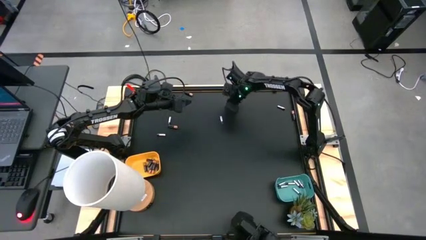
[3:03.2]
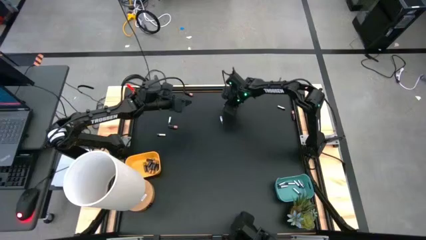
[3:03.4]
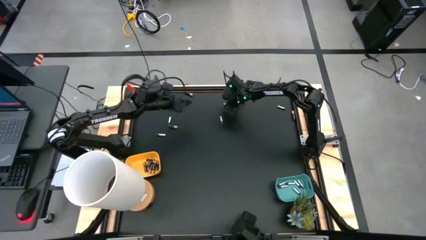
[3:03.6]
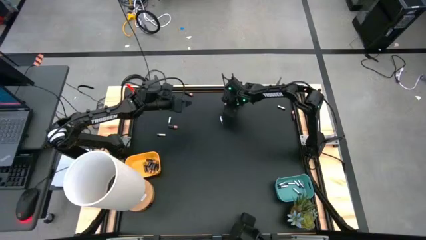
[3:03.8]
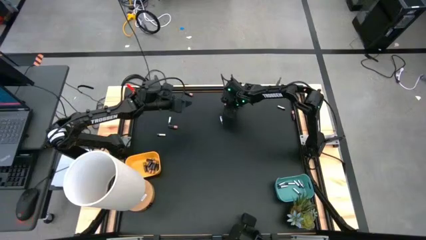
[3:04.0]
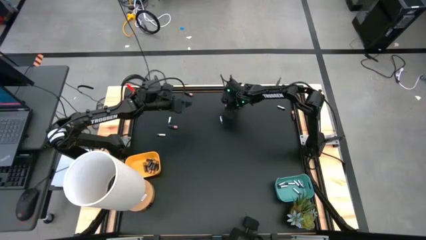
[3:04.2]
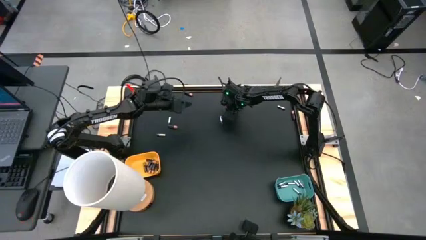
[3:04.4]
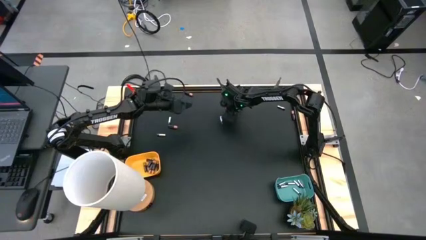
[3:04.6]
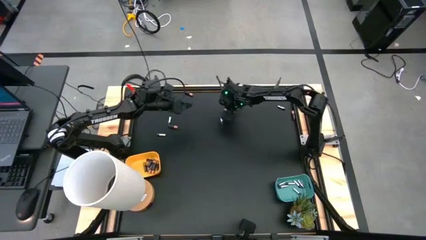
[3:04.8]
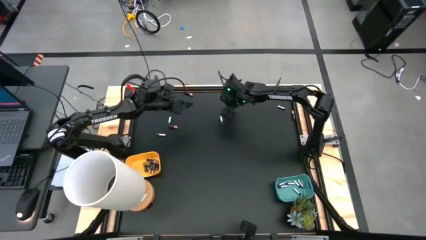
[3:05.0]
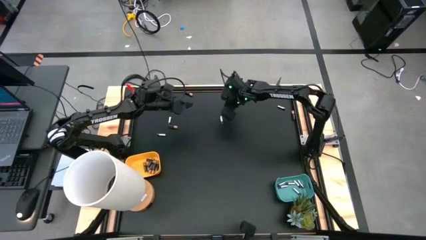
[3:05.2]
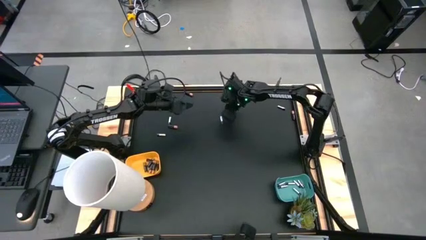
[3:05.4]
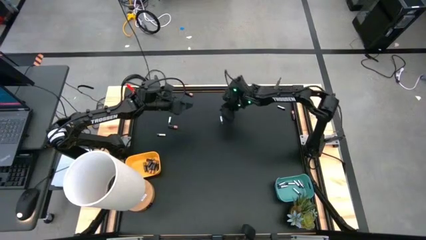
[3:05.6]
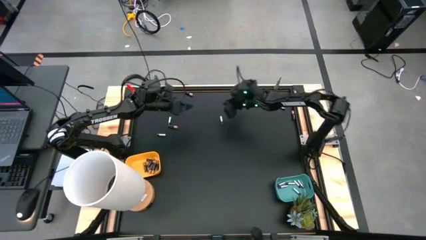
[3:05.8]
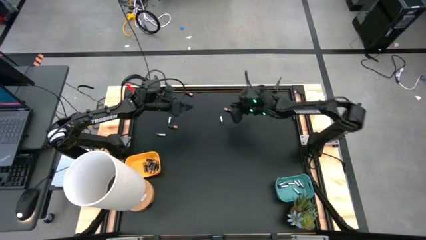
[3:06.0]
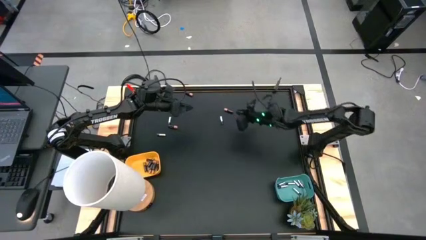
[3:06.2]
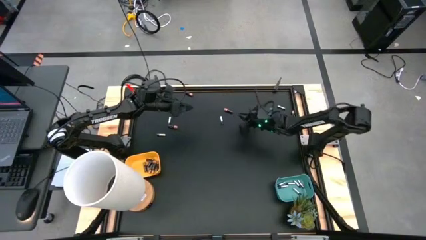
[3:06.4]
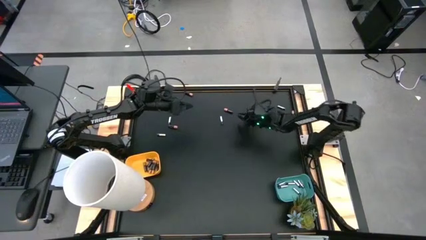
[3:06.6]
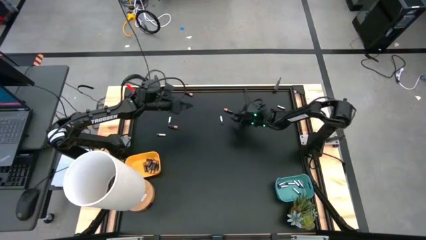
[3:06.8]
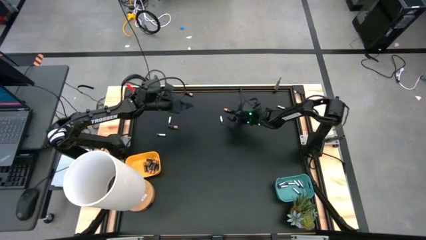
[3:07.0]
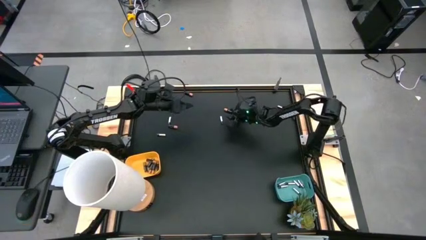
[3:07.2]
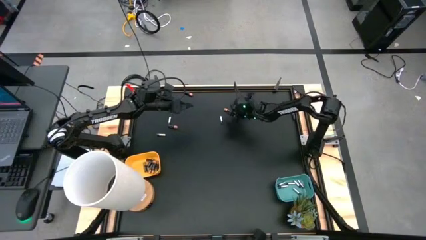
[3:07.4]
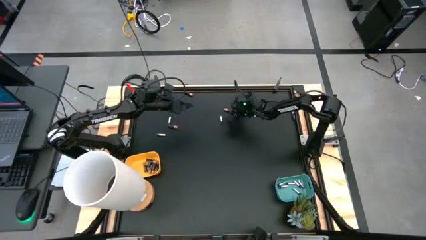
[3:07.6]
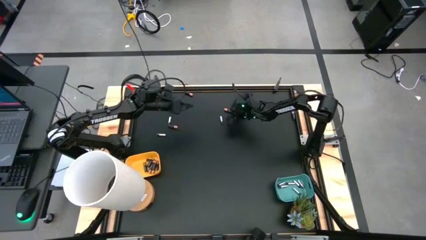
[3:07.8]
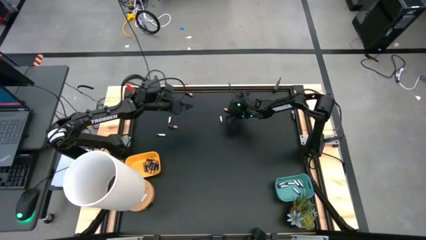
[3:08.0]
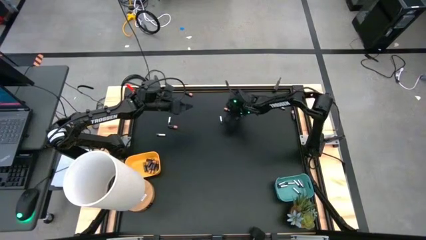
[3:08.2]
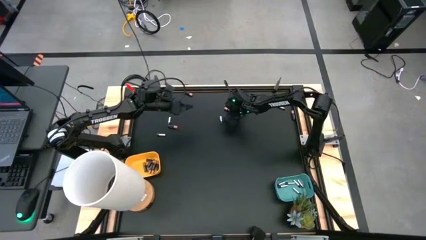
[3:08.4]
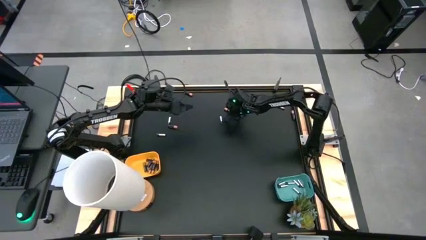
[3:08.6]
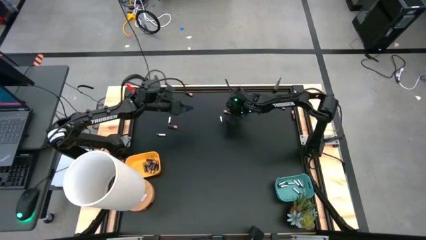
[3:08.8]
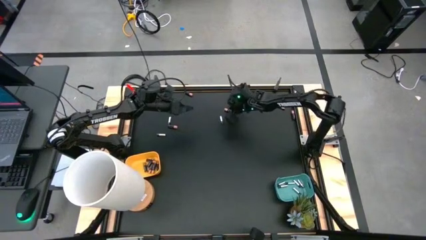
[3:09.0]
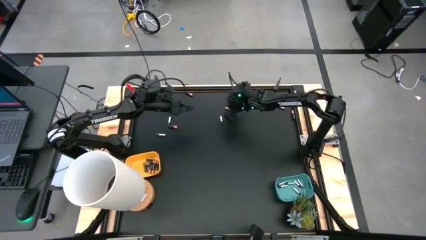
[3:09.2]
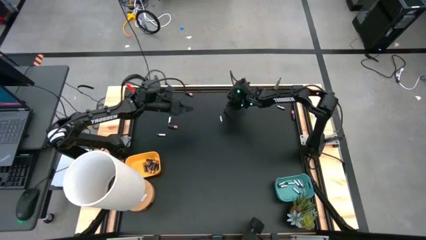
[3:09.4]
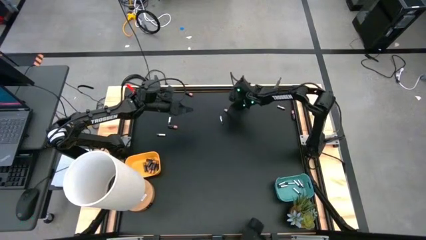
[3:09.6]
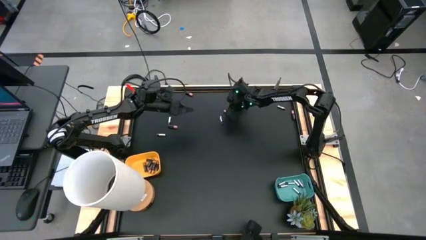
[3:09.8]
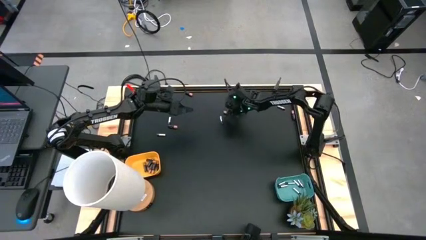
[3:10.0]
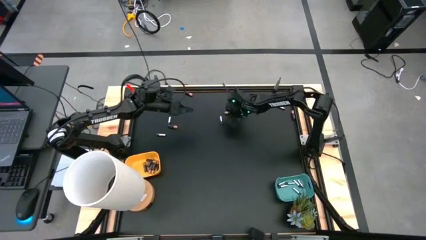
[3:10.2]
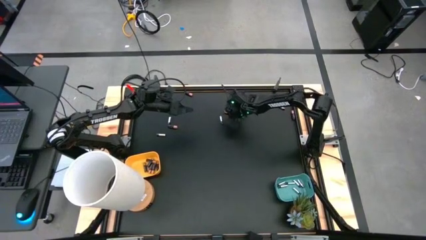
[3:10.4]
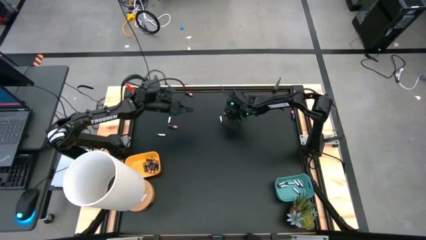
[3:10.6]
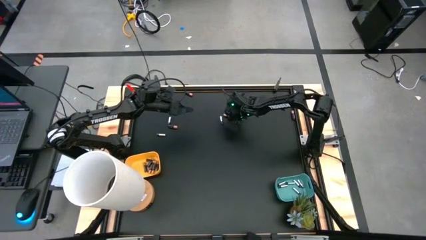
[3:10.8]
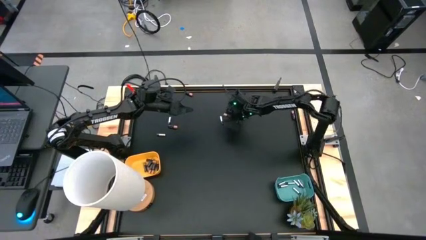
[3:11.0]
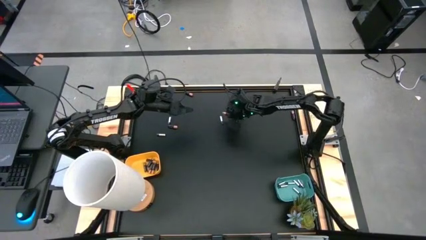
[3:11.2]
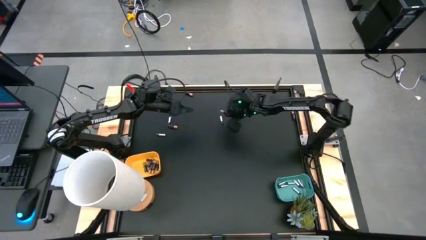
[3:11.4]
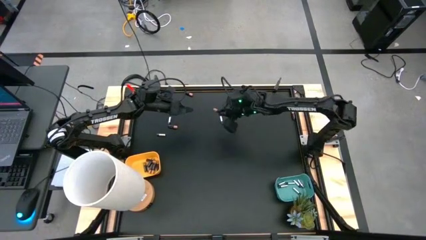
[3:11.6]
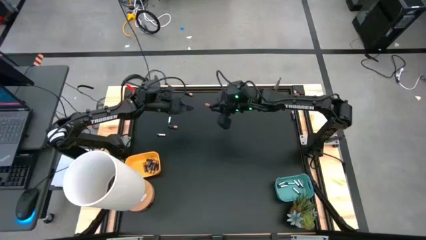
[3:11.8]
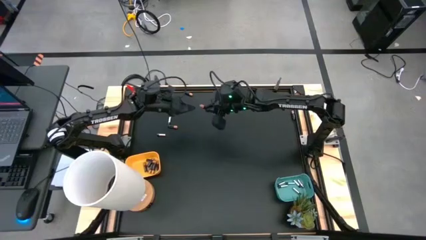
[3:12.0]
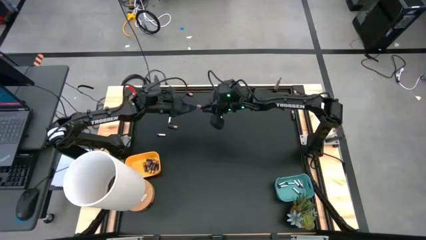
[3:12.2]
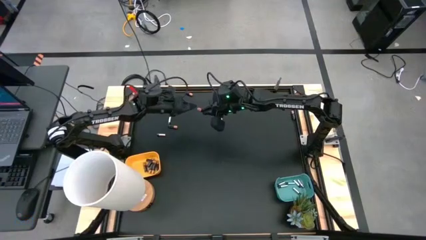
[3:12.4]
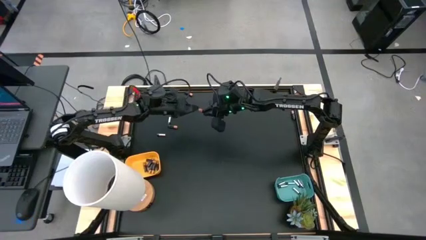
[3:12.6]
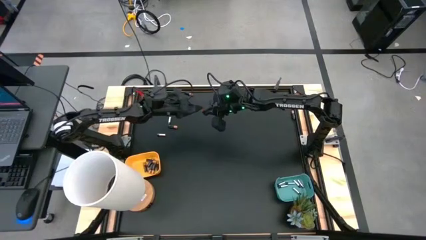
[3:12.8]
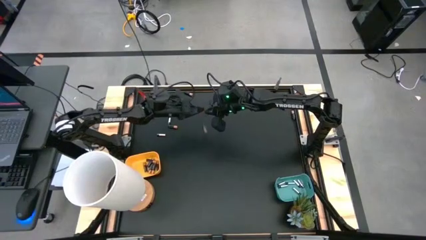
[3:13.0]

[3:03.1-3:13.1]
Task: Sort batteries
Put the black battery into the yellow bin

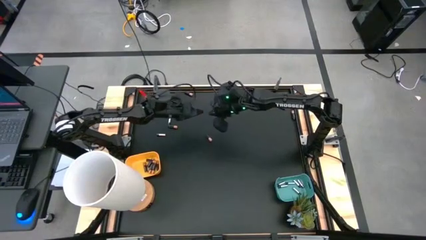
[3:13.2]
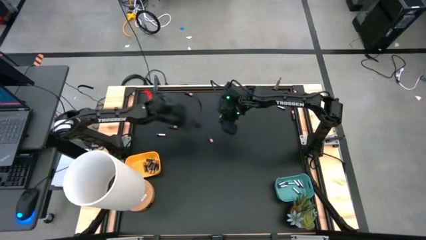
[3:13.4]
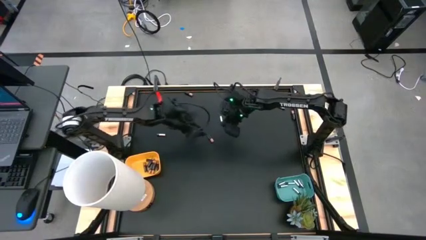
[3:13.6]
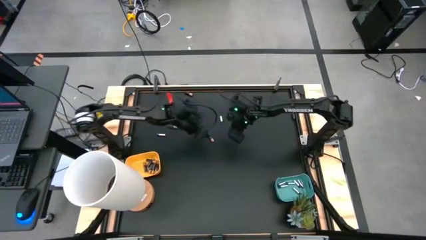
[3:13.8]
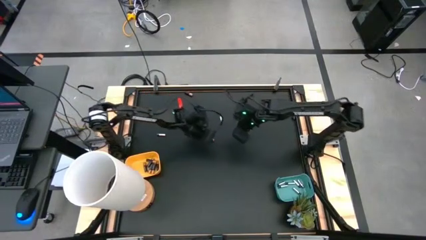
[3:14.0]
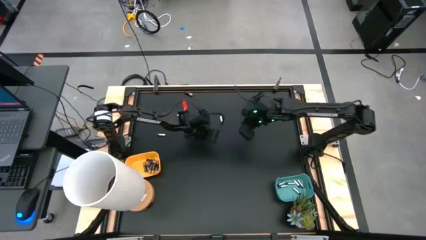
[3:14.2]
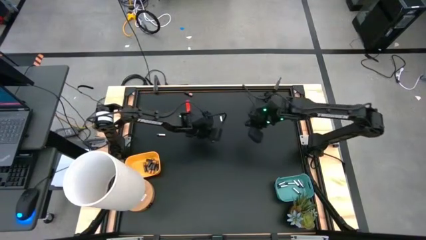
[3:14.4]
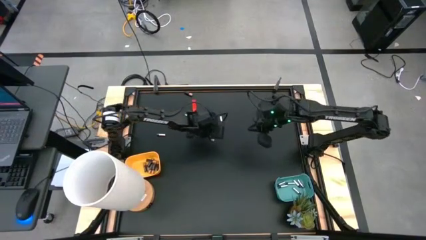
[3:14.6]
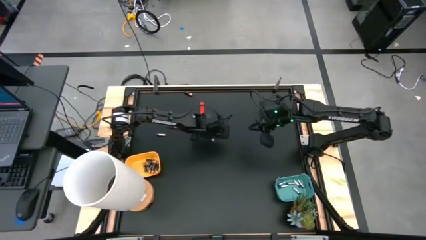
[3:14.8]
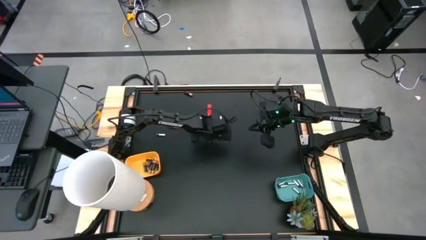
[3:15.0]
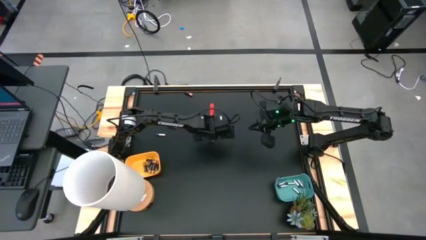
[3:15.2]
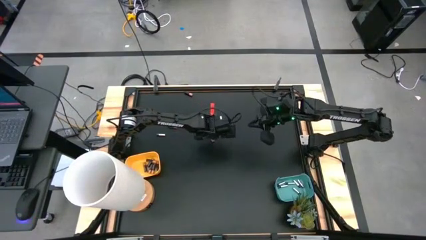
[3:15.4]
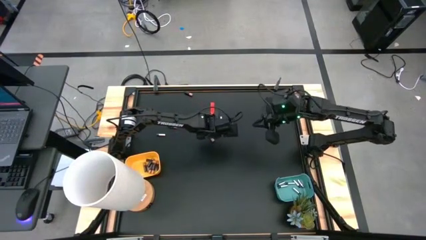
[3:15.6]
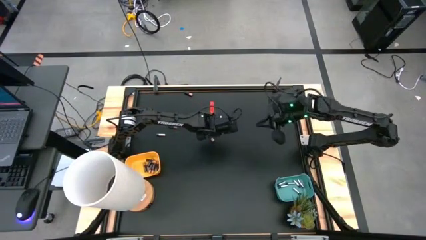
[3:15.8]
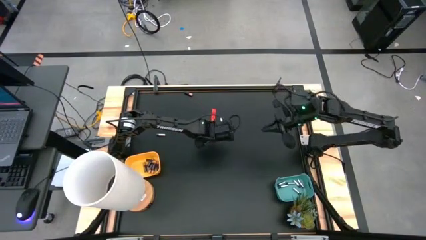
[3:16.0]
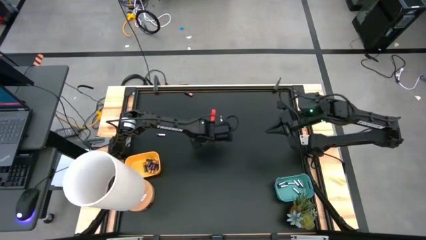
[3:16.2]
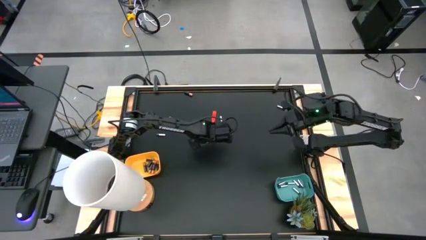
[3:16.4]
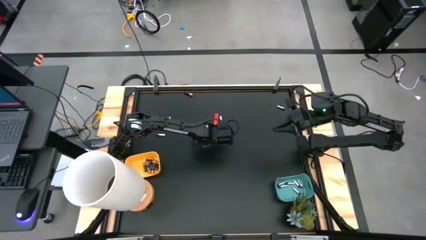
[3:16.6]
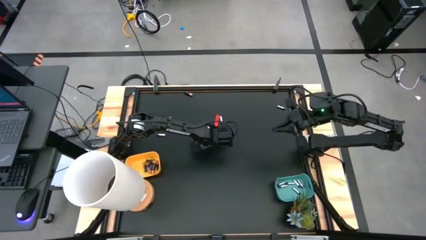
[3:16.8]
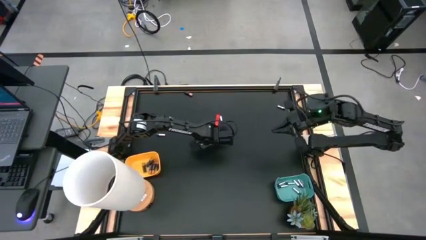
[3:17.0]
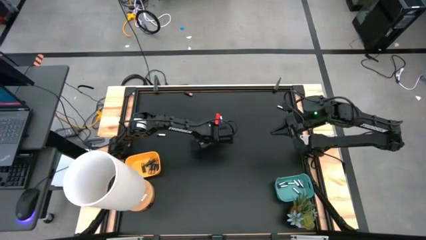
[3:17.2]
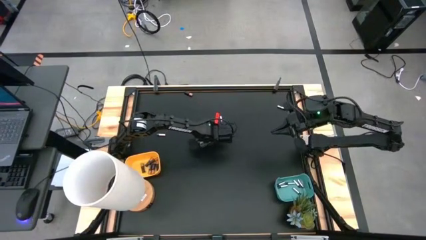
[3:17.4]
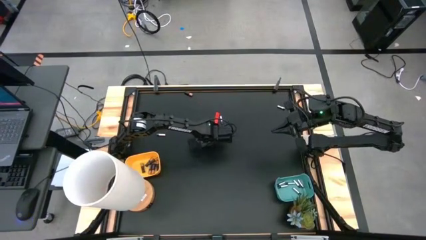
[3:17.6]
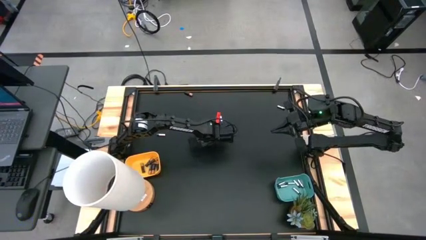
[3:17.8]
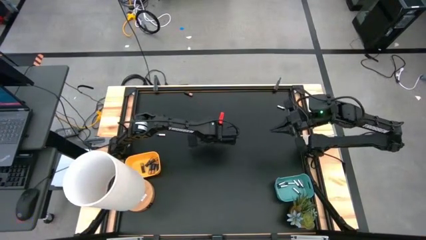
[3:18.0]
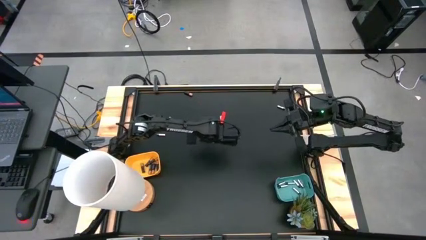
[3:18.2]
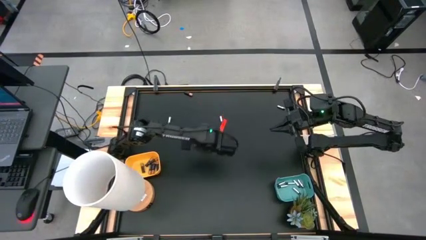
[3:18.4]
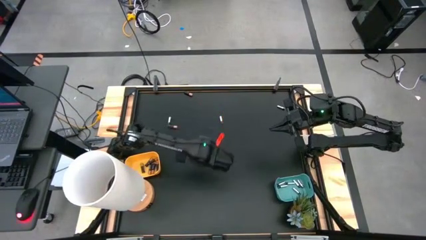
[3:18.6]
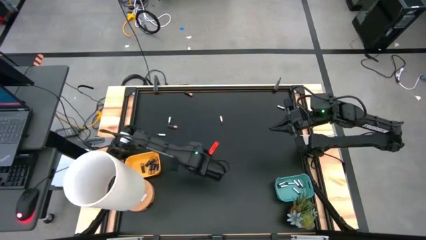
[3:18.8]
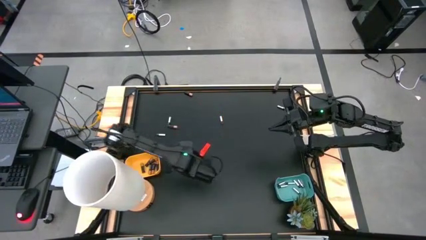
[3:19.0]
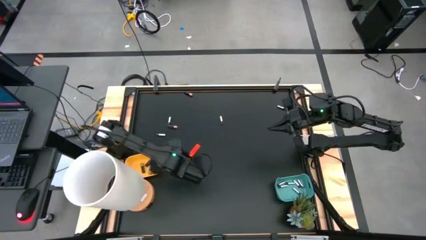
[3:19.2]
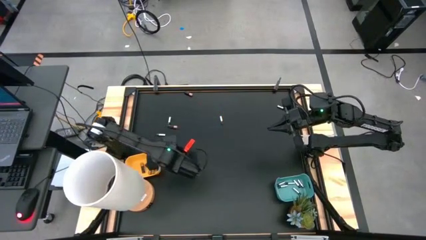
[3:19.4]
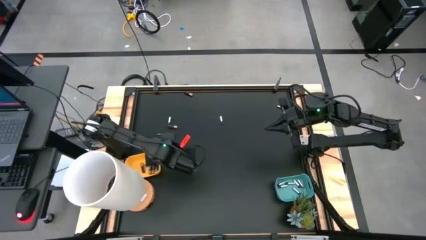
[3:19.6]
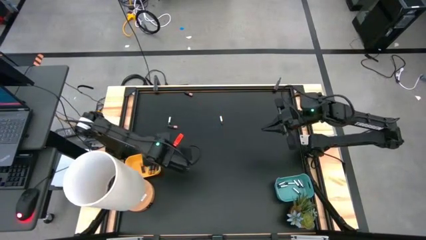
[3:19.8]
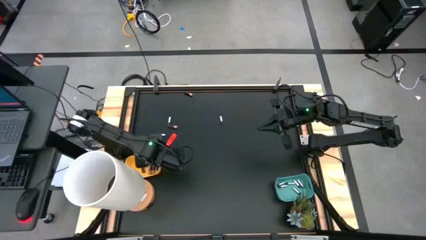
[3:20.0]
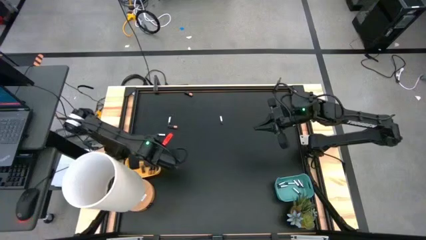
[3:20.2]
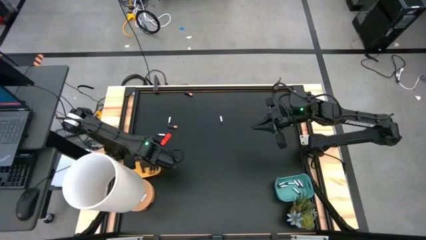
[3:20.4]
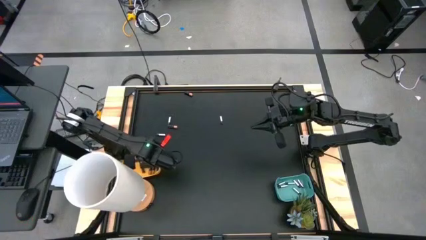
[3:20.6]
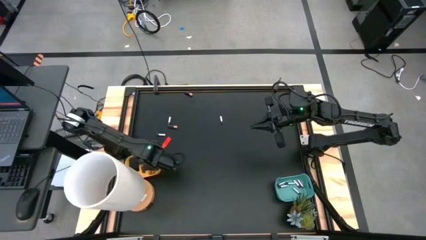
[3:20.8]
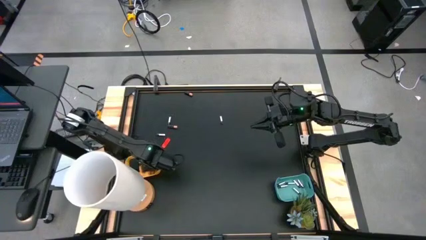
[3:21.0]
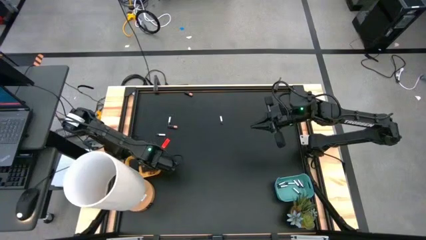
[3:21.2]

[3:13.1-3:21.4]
Put the black battery into the yellow bin
